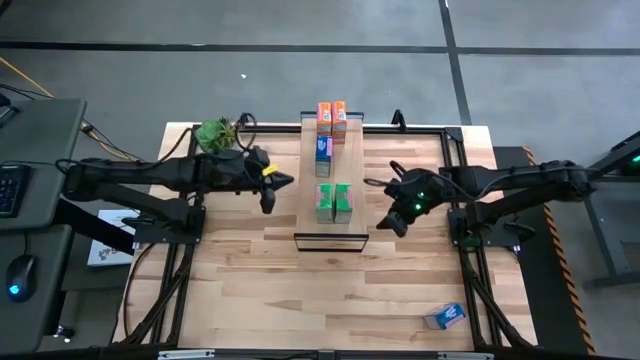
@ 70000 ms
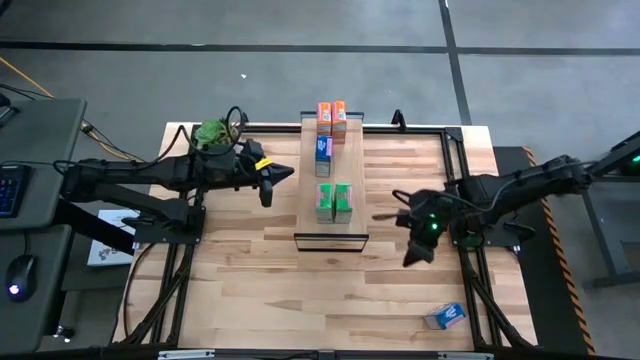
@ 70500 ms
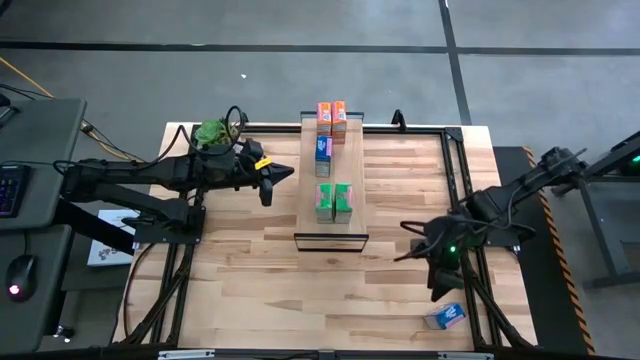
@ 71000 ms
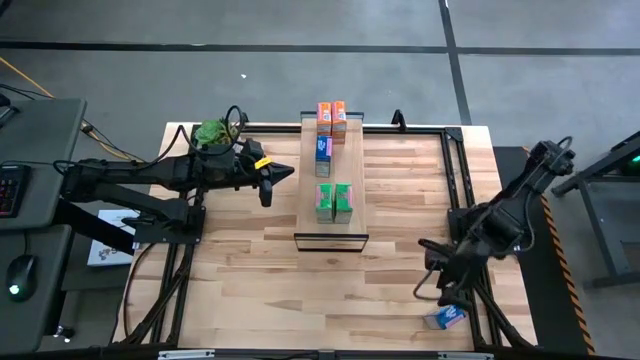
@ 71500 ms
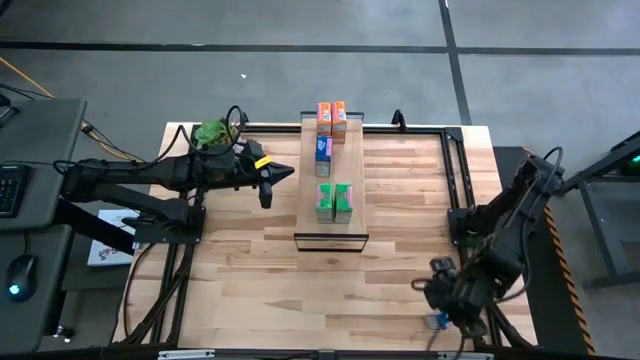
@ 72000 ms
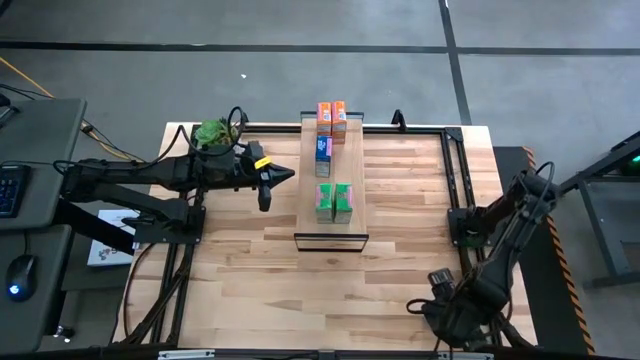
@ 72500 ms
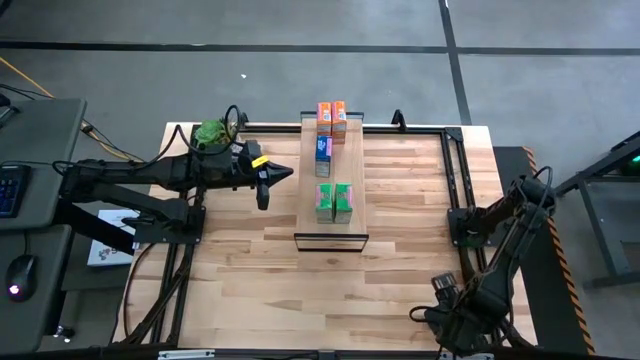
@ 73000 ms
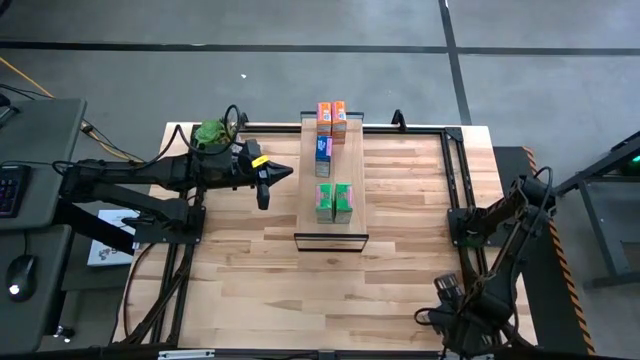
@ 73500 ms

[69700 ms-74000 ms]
Task: Stack cereal on shelf
Put the blue cereal box on the shelf

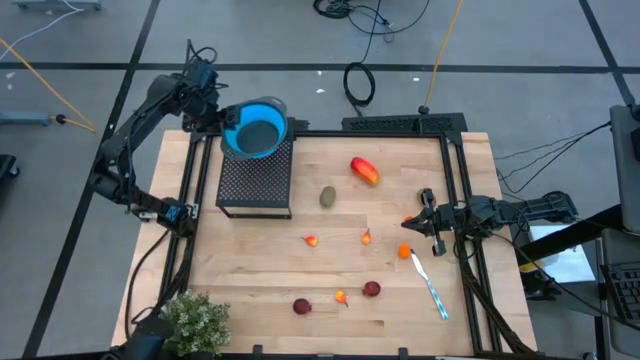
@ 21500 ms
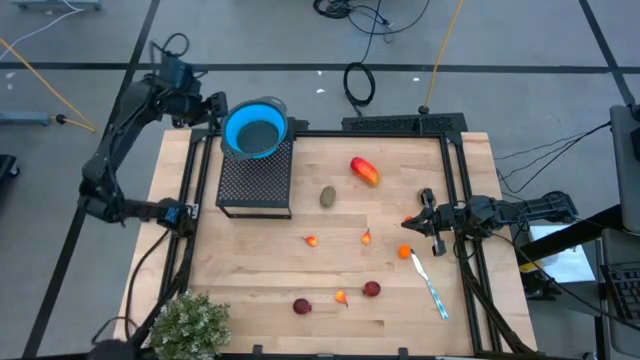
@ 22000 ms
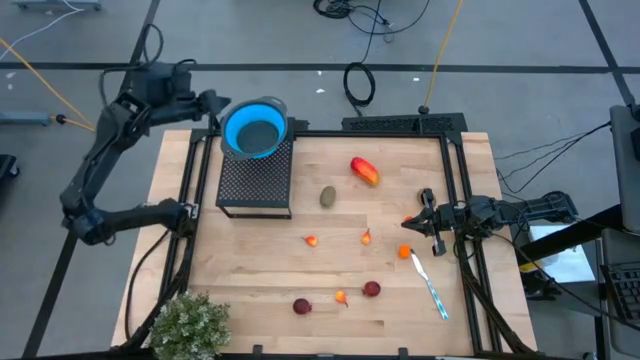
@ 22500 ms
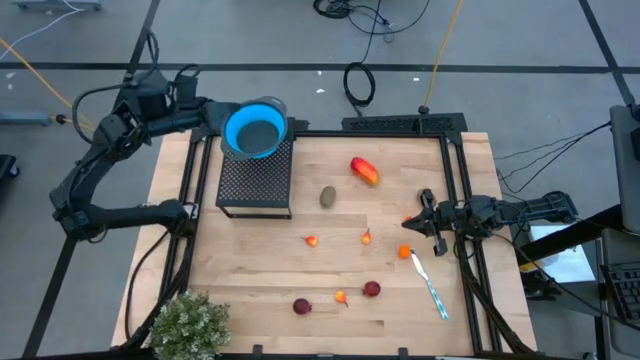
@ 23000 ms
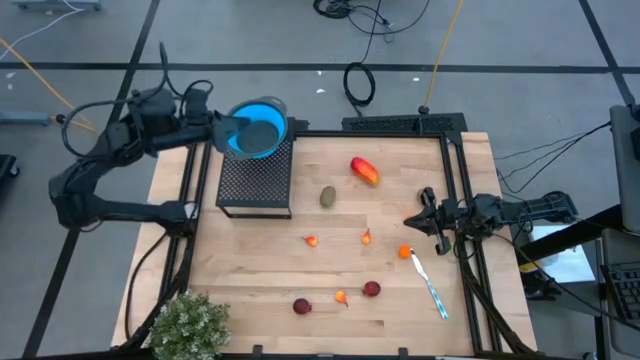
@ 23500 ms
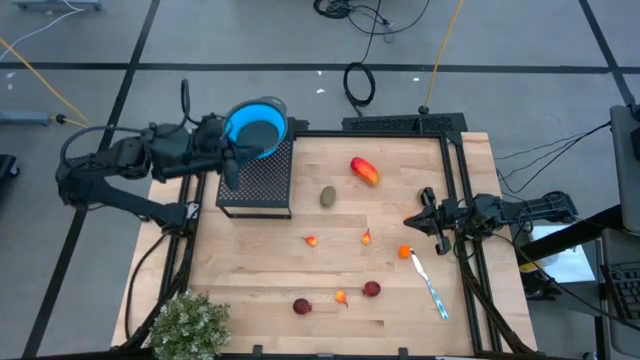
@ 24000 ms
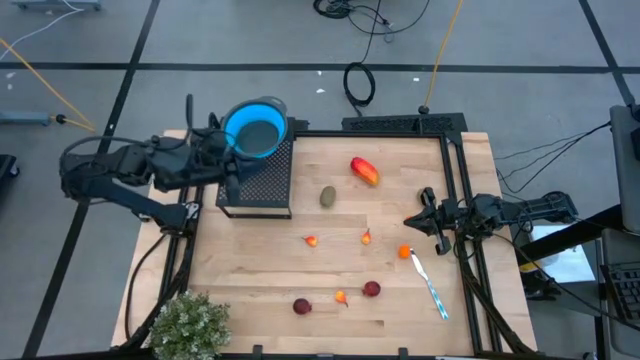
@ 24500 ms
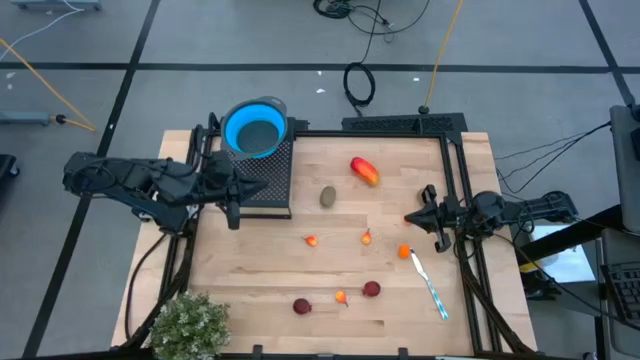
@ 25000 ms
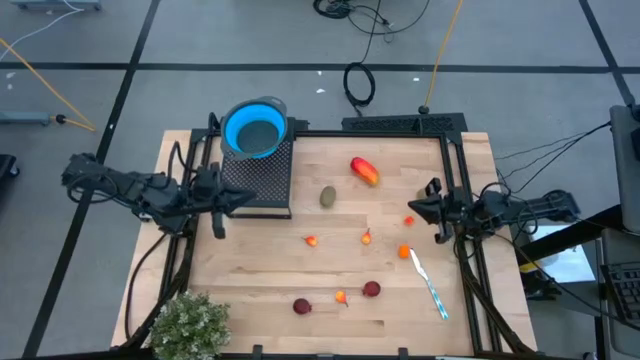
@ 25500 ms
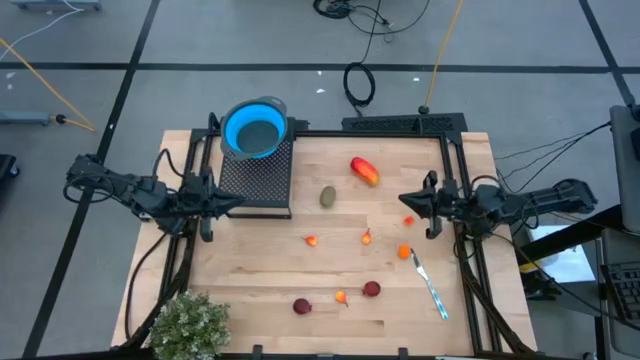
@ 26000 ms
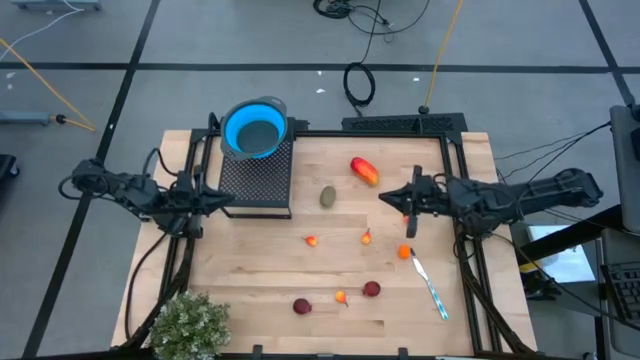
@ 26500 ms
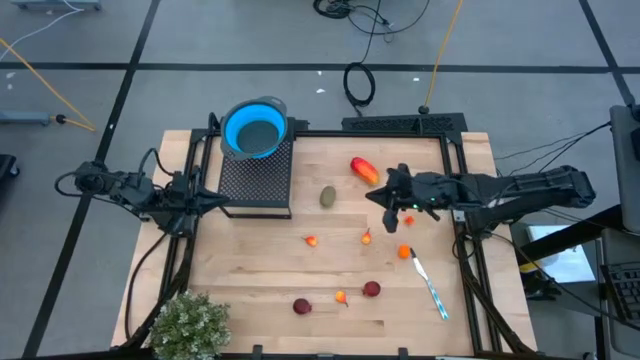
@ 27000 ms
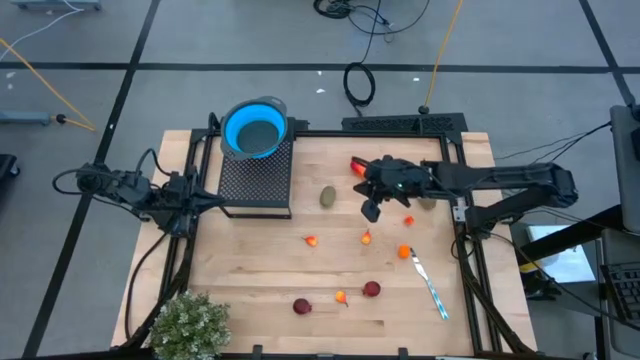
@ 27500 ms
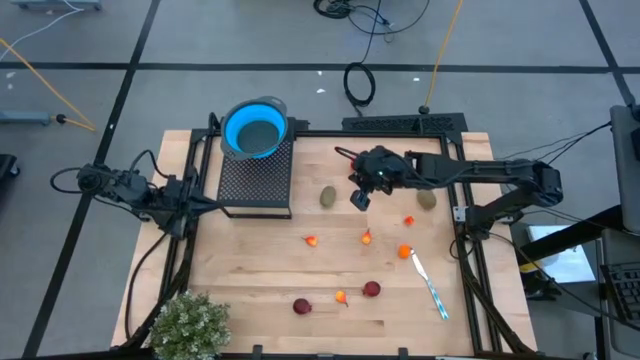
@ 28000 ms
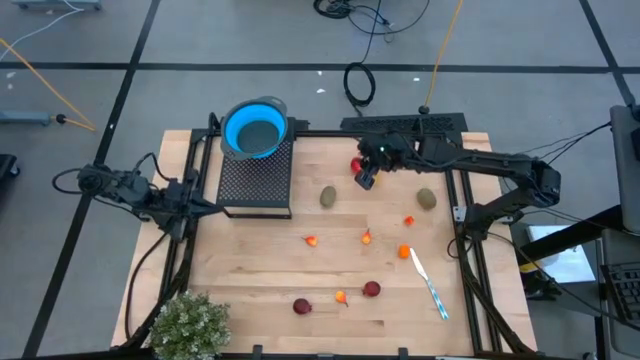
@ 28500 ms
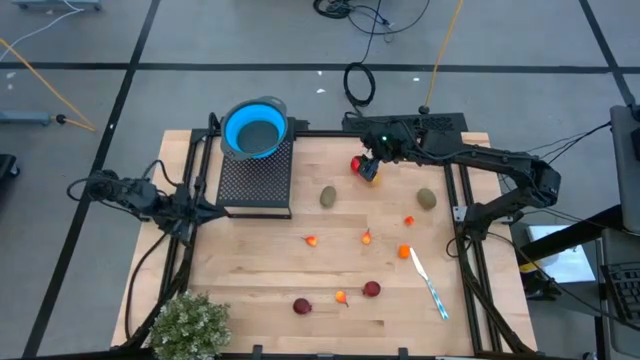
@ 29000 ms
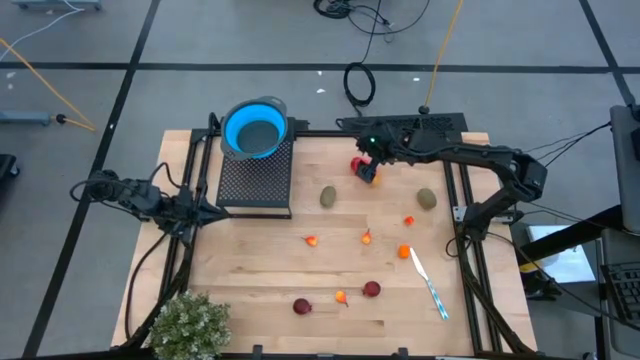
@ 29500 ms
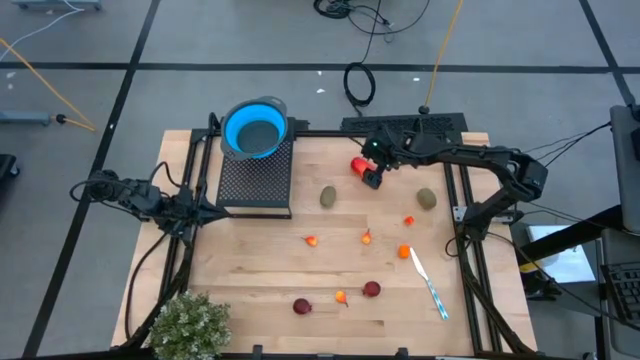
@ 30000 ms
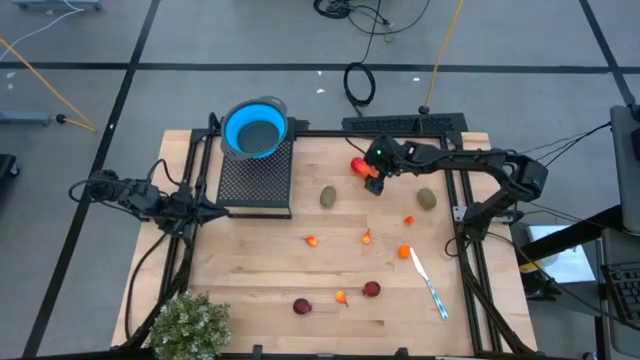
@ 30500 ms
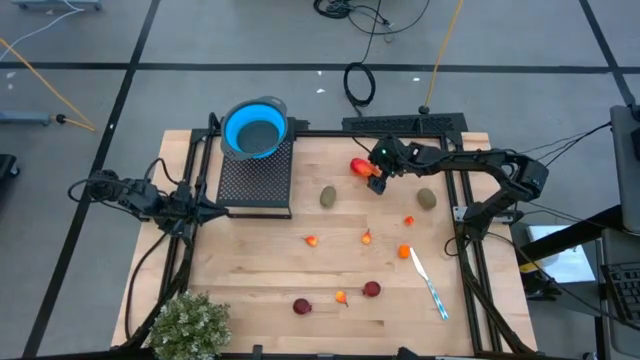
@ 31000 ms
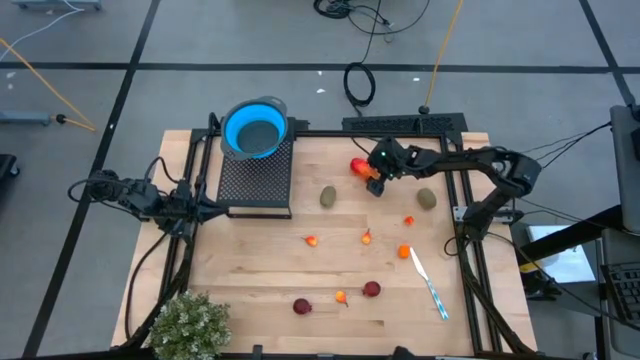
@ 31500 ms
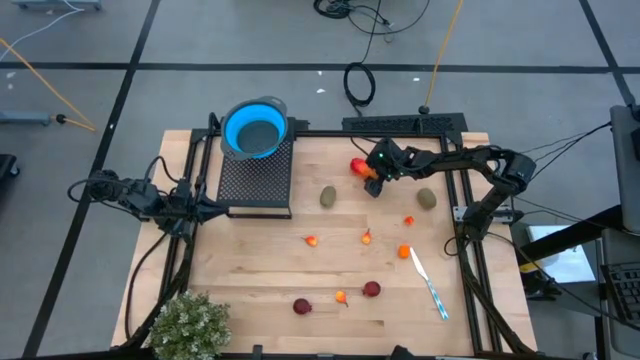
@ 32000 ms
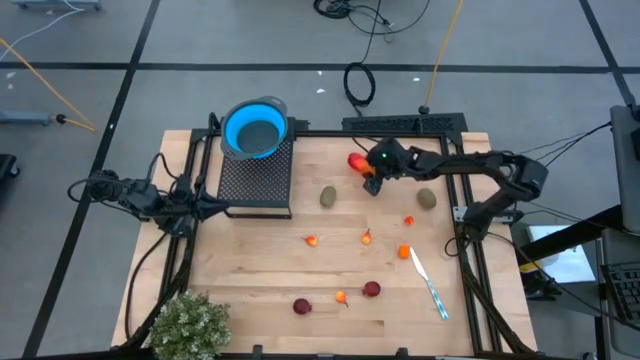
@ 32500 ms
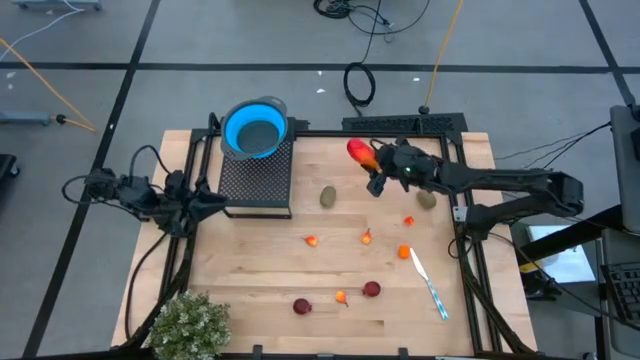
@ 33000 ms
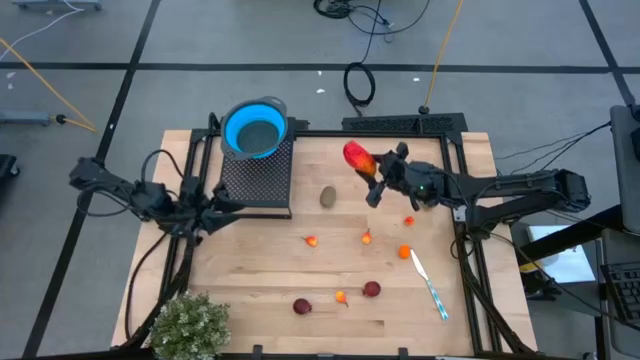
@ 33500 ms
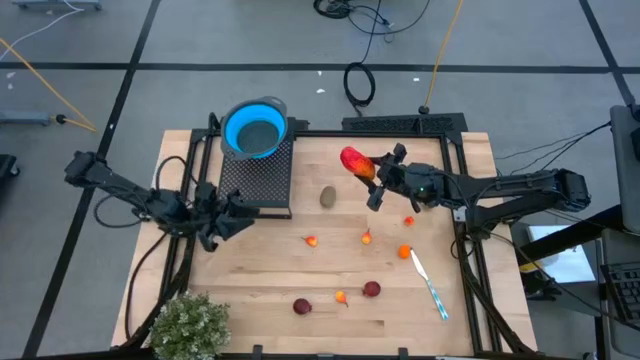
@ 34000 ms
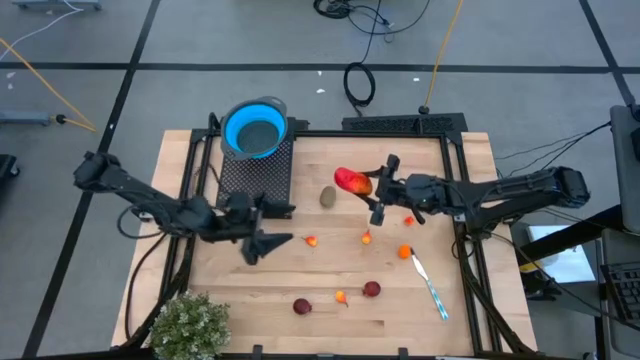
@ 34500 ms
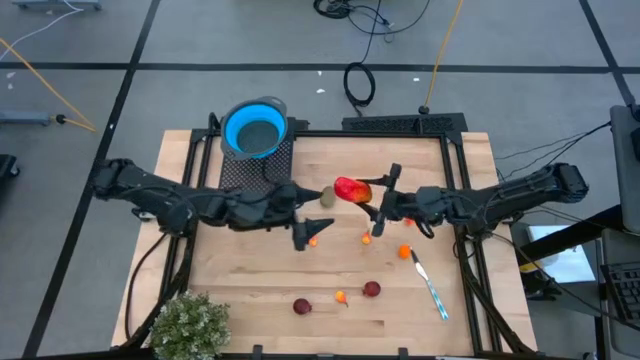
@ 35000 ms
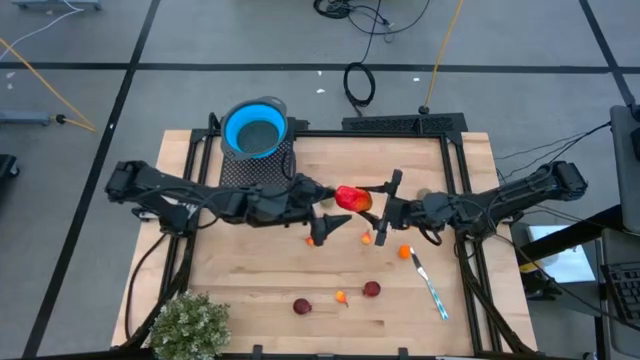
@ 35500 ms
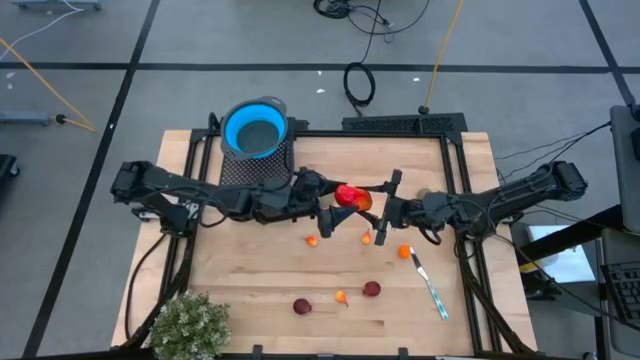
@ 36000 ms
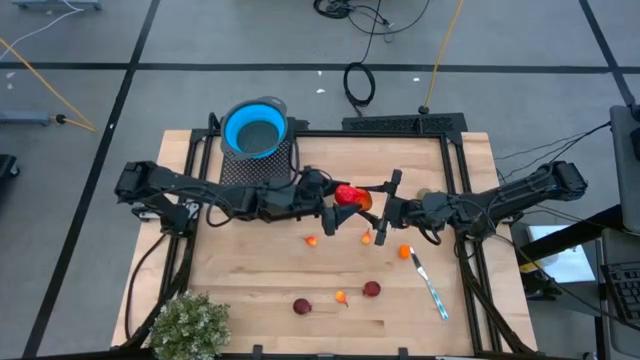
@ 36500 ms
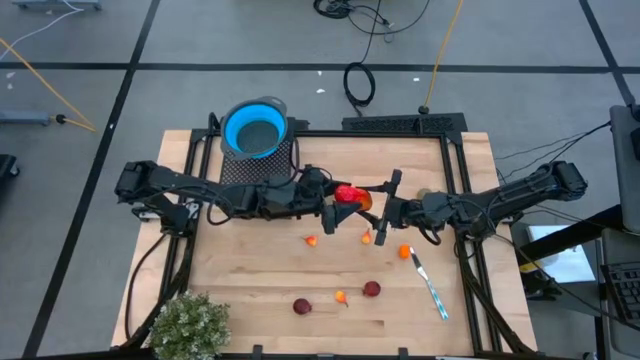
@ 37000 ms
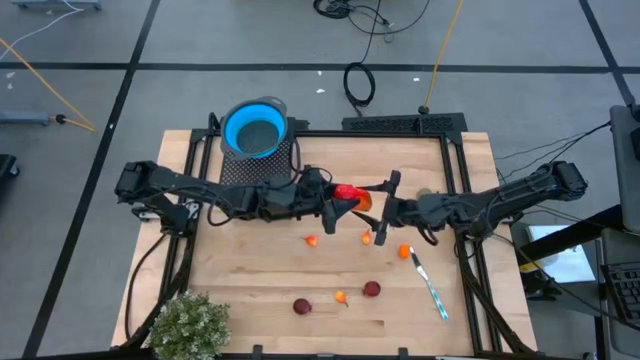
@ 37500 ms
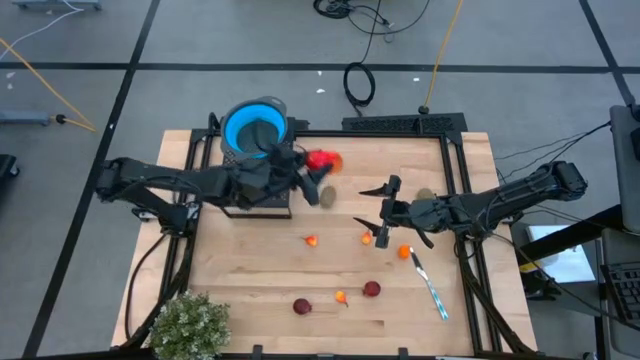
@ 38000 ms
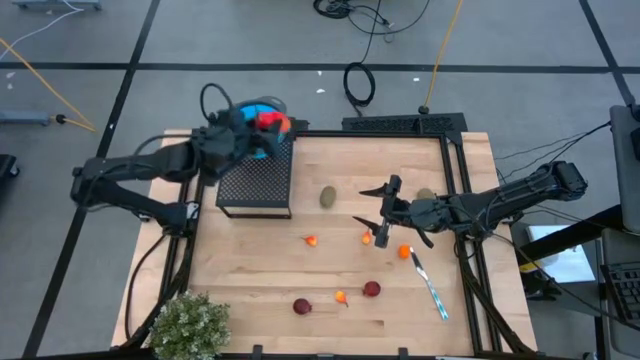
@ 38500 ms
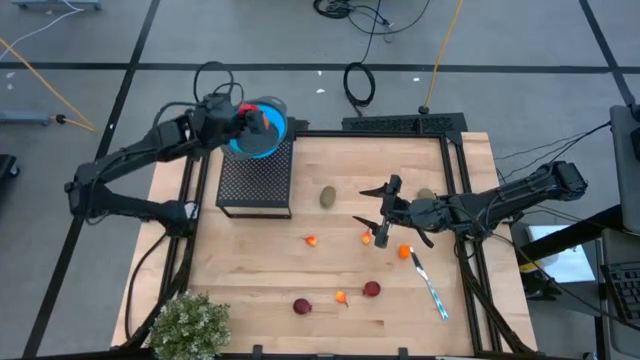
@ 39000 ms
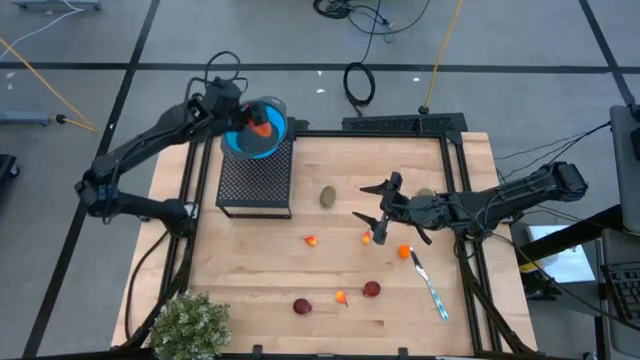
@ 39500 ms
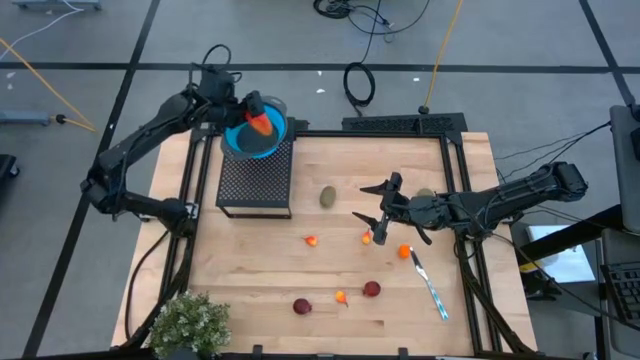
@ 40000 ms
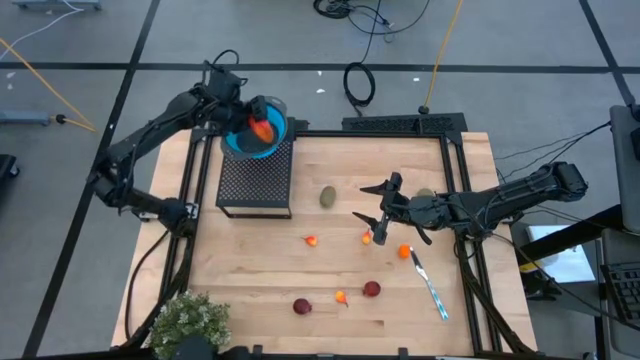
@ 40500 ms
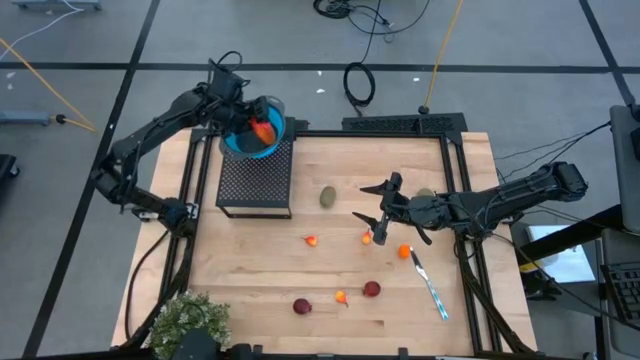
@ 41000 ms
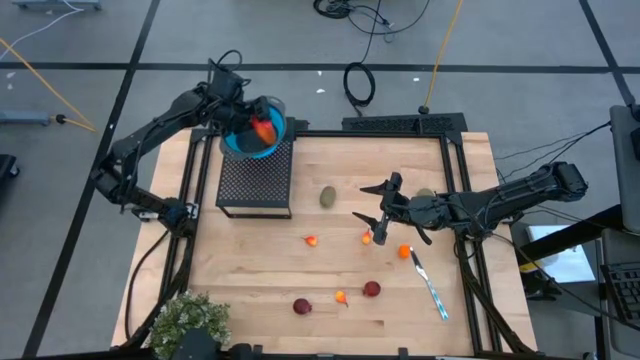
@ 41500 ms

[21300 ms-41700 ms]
Task: Pick & Place Fruit
Put the mango into the blue strainer bowl on the shelf
